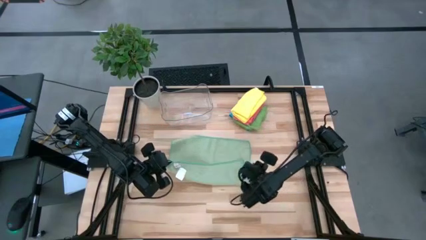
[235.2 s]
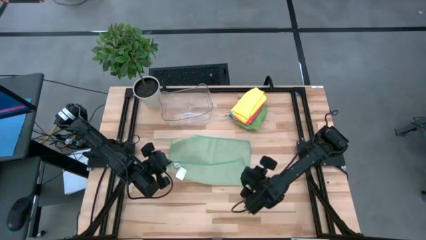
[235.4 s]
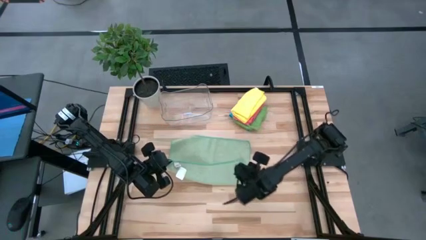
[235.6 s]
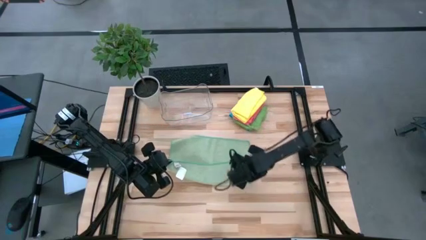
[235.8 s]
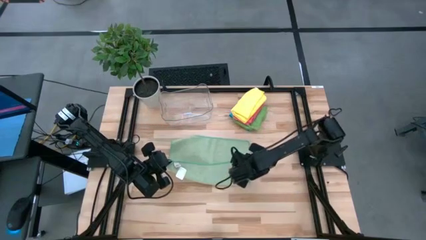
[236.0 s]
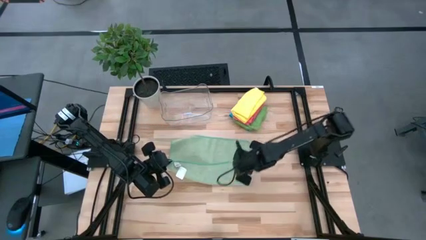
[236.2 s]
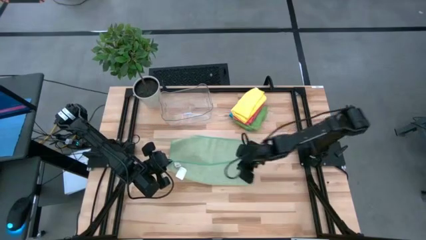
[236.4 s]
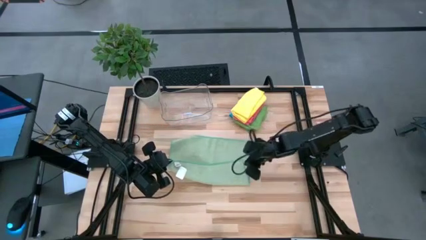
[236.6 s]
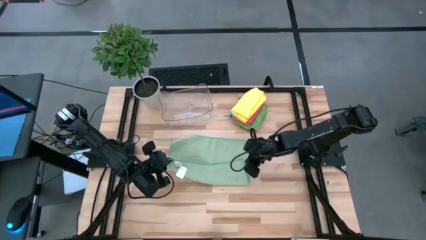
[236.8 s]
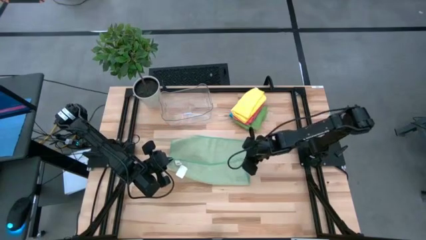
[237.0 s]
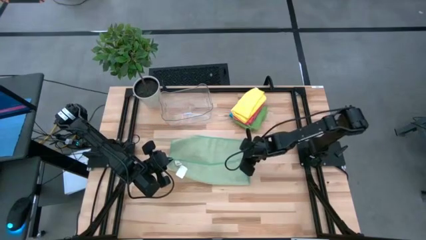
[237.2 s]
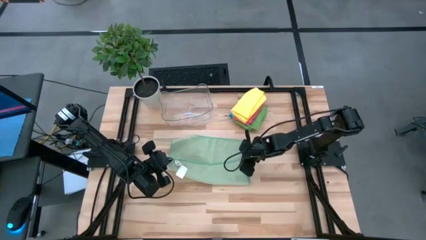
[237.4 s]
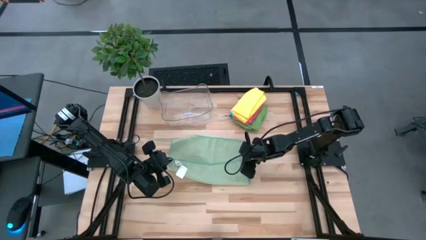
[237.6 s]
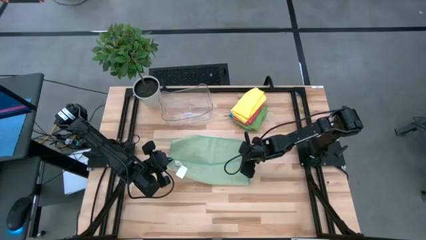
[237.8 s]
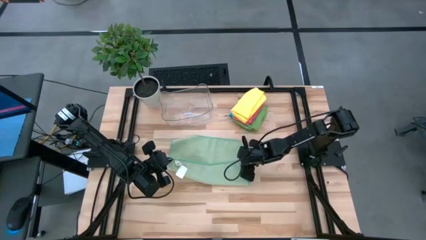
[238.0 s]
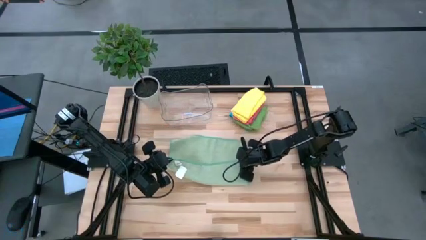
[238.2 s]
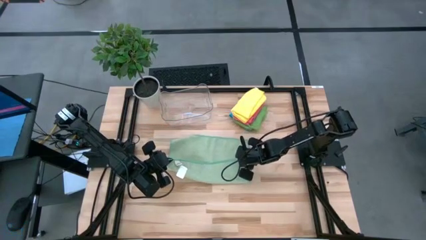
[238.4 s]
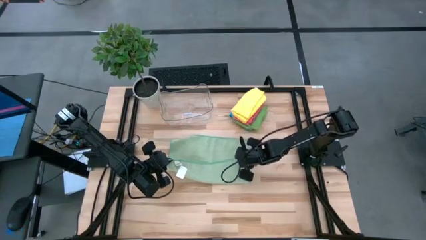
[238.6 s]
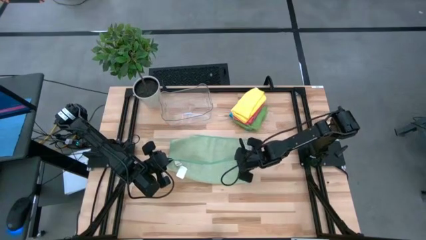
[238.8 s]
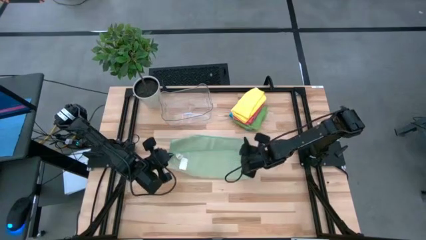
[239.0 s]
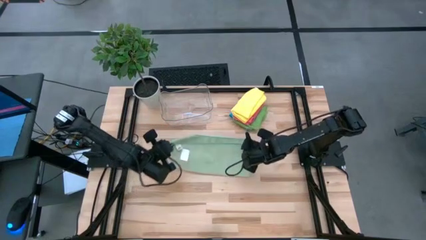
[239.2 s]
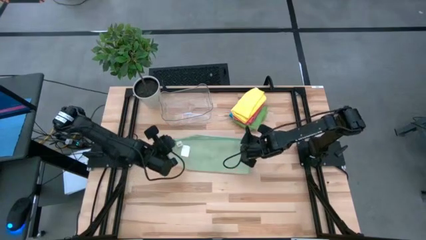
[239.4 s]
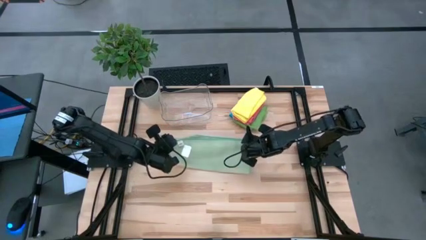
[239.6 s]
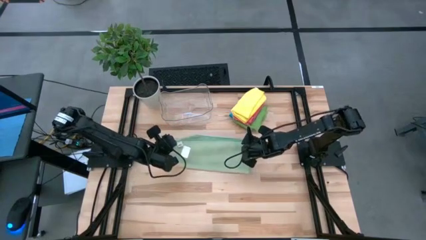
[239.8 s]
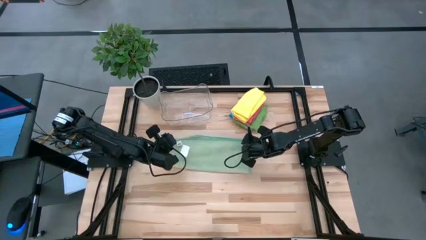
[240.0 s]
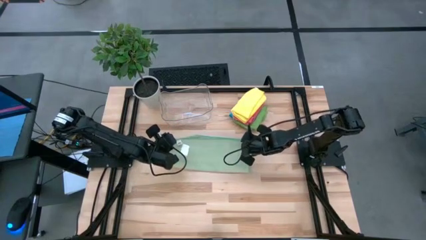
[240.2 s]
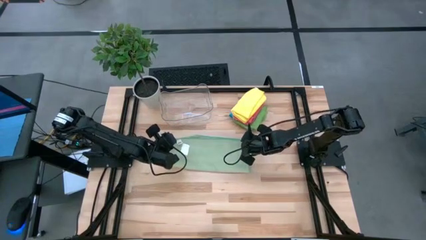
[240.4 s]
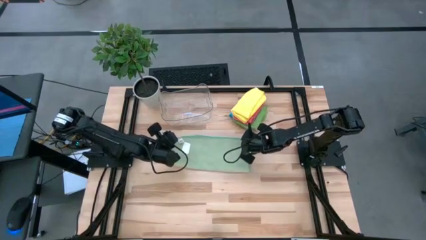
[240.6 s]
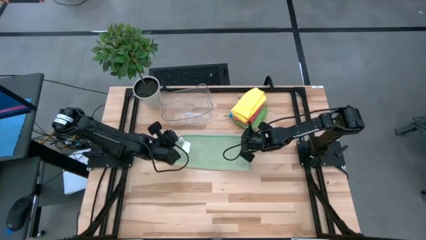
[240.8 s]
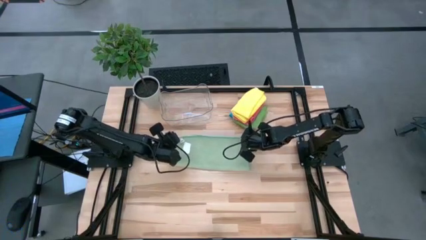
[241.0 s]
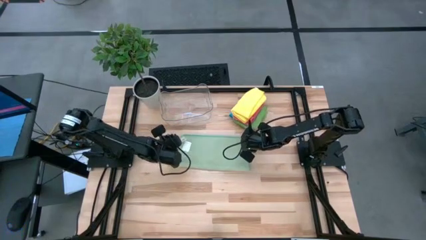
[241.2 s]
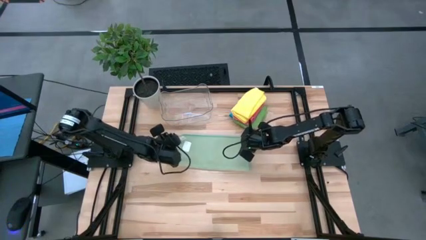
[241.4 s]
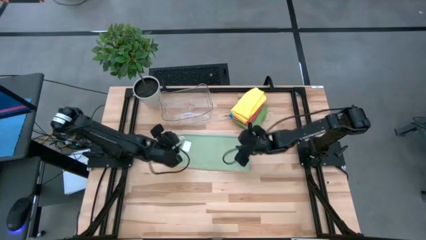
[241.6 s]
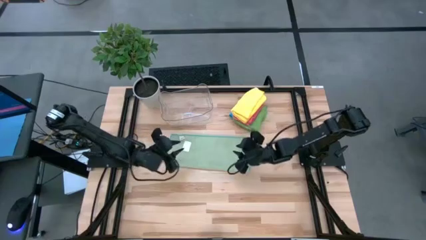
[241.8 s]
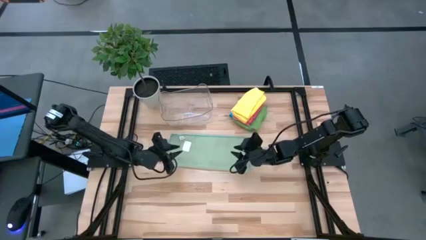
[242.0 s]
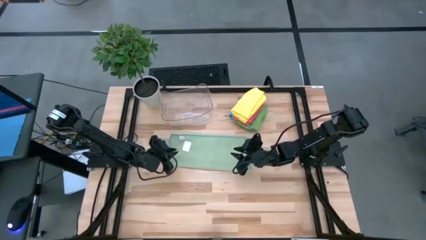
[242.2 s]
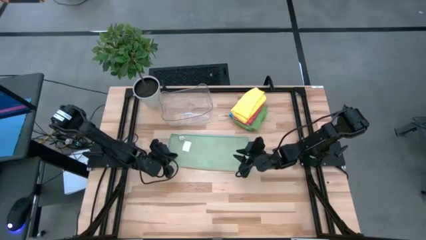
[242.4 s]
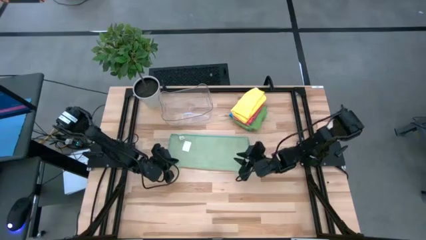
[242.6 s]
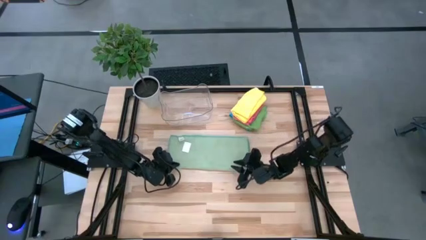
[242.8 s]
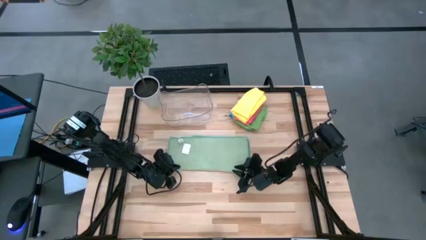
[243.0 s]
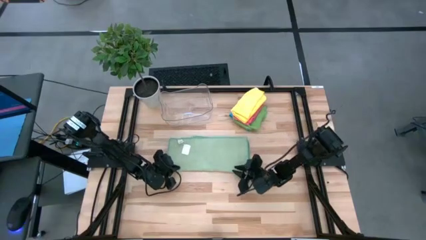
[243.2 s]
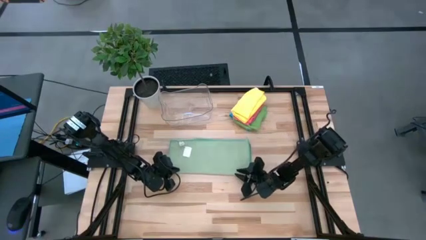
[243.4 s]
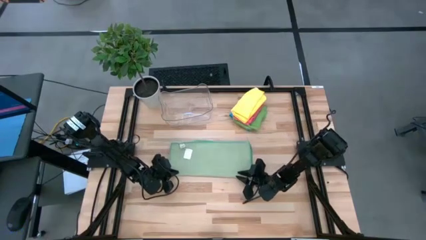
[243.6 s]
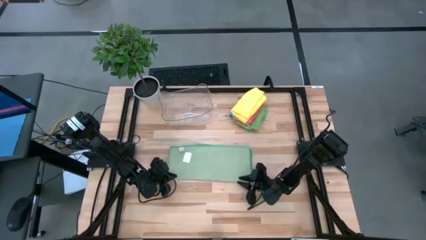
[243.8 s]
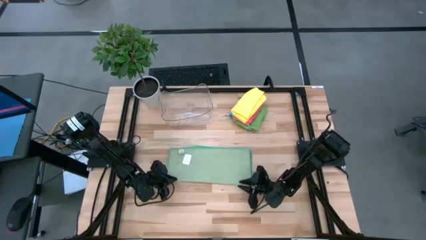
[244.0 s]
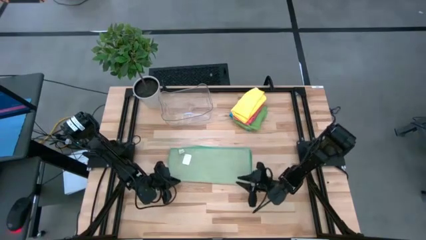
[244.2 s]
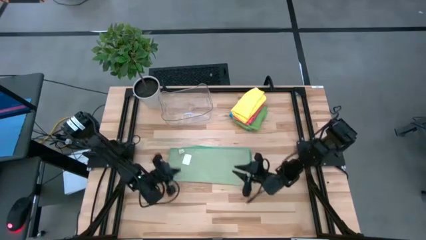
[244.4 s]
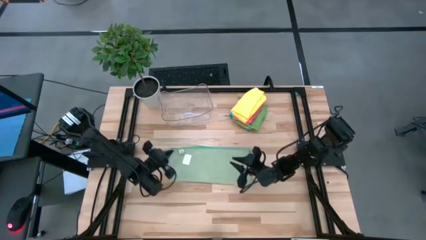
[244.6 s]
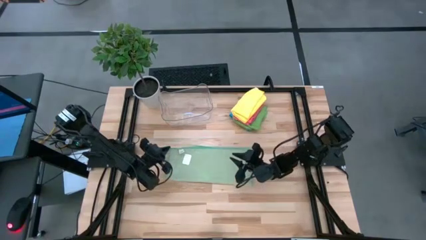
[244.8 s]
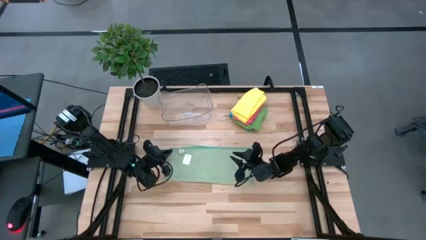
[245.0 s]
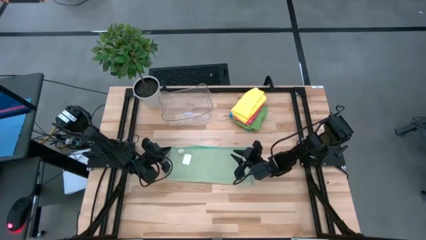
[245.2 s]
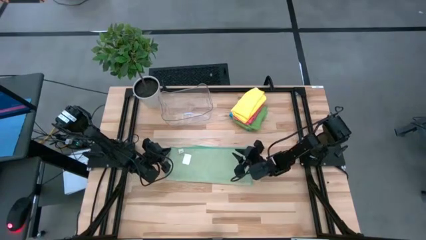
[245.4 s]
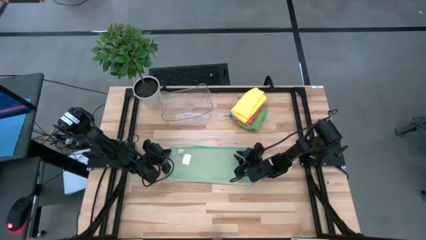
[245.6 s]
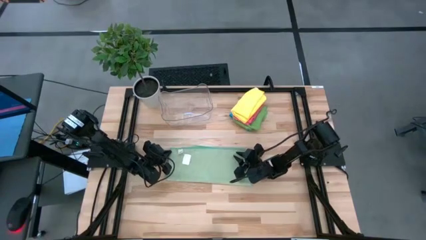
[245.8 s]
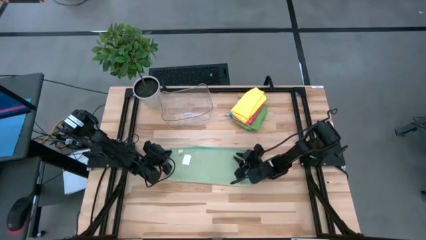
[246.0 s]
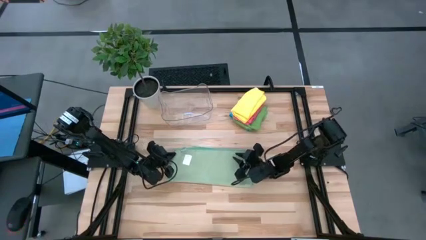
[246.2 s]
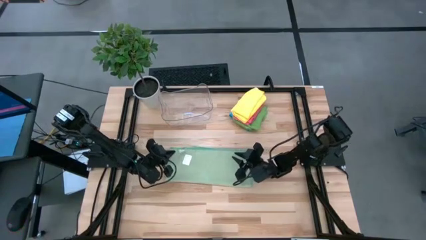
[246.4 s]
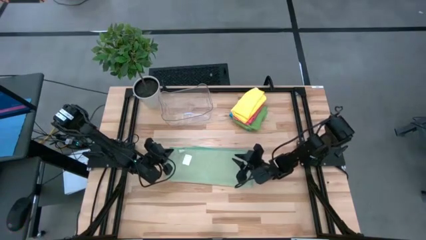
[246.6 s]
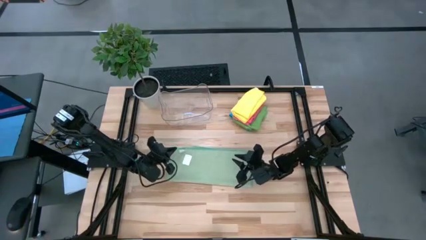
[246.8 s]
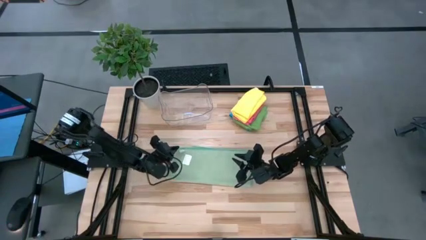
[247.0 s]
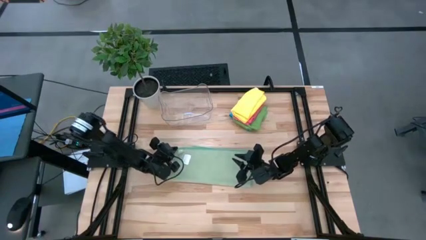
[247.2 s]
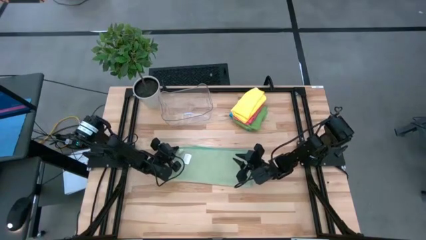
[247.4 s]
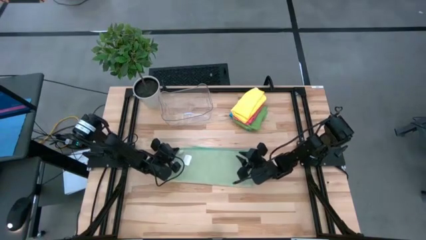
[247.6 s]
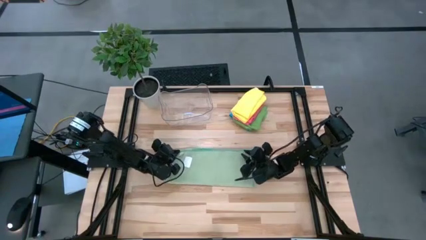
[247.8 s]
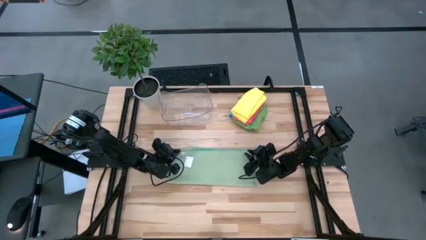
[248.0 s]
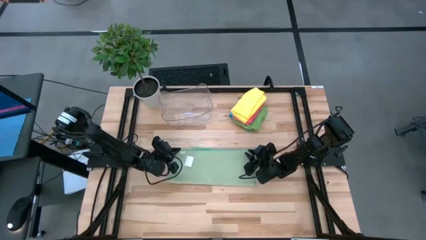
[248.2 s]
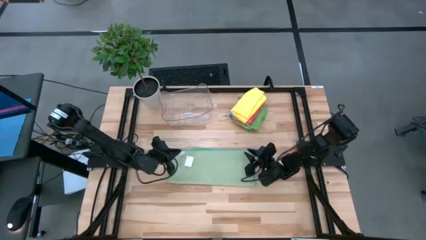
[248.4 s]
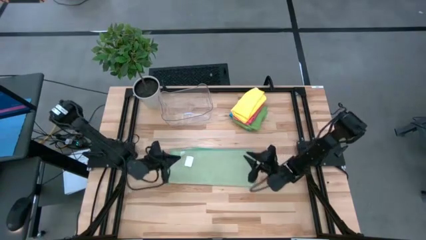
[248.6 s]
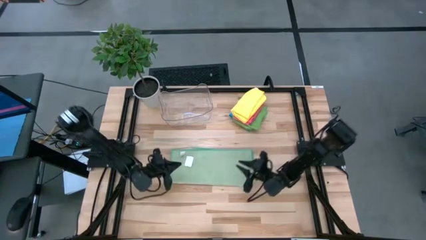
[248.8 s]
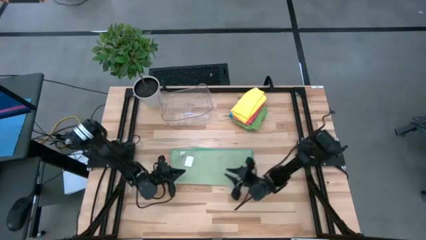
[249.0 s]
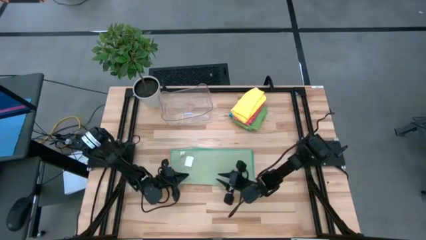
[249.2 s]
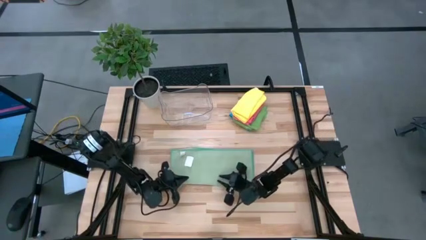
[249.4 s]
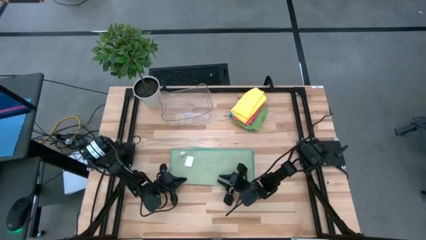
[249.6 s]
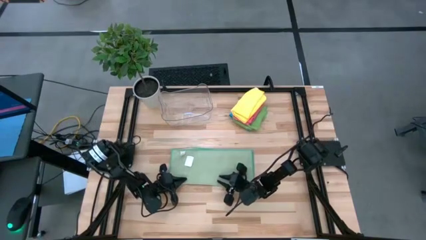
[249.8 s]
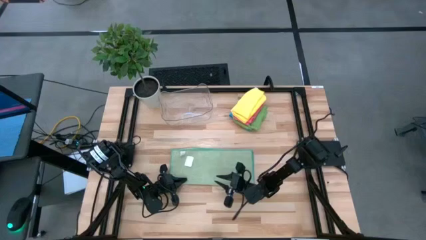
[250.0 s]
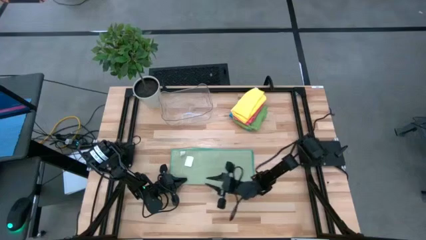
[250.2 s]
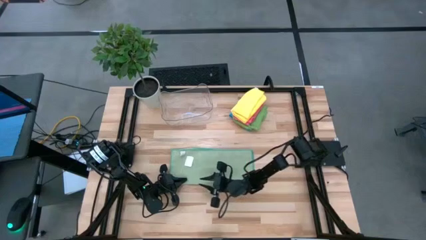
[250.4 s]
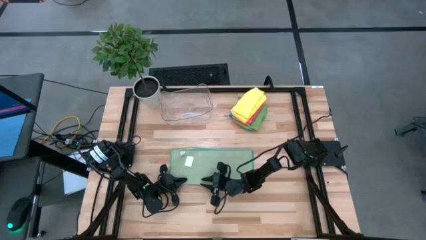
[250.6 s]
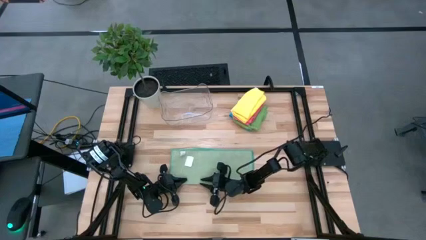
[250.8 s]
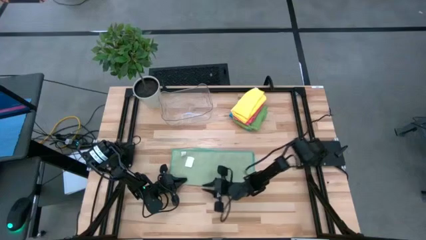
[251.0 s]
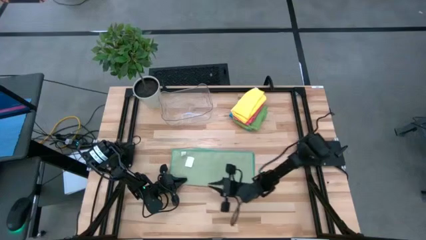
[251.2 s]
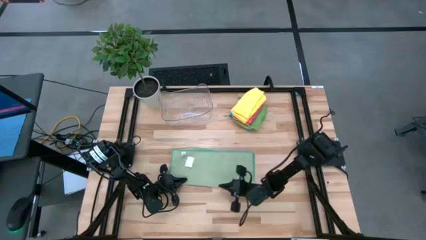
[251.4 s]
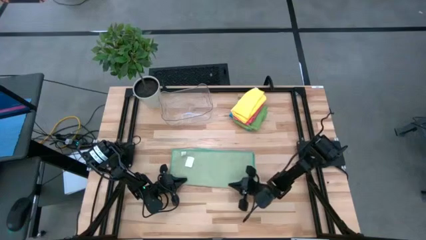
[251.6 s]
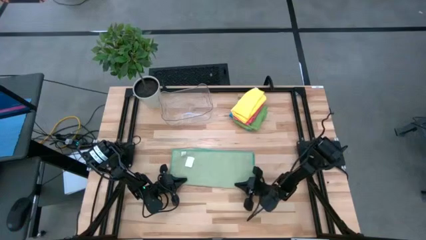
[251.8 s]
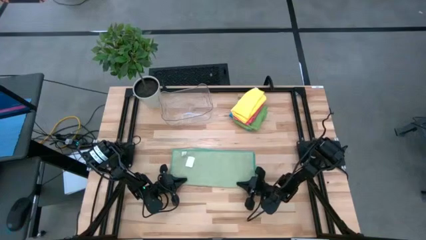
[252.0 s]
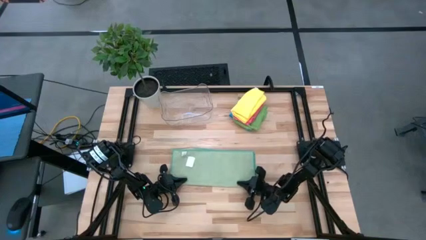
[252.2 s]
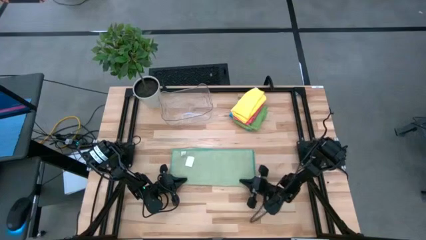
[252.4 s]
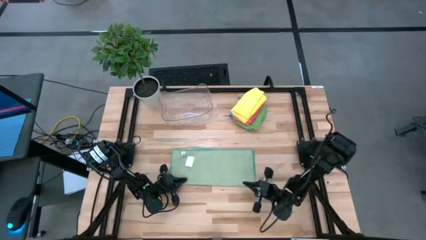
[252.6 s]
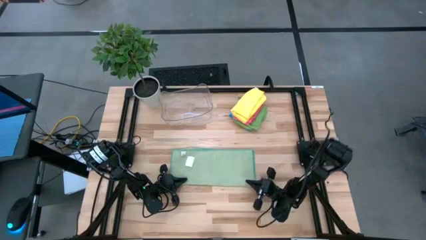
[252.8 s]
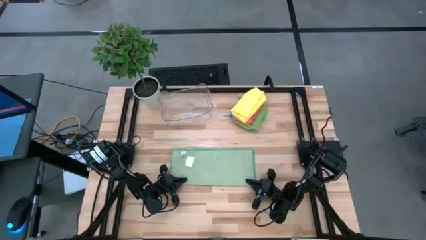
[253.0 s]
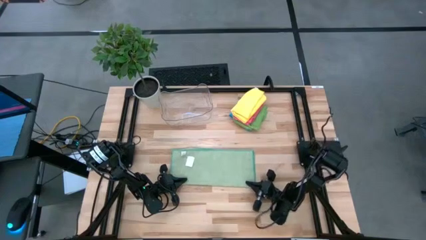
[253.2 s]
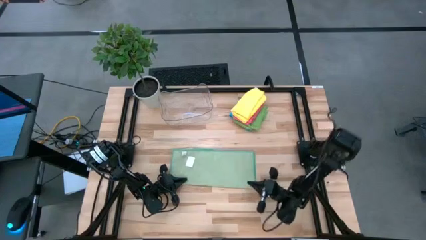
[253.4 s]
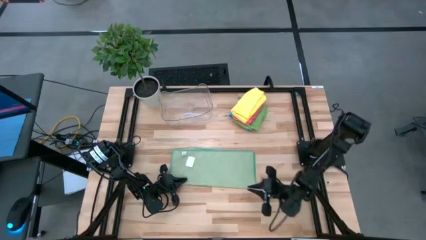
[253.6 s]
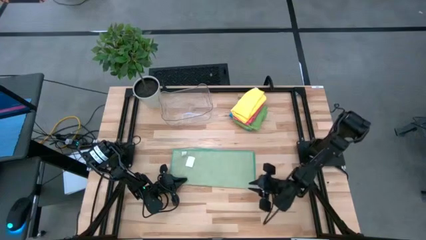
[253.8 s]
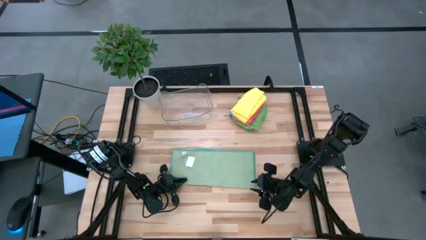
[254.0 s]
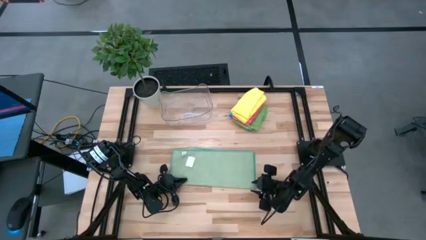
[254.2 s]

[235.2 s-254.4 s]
Task: Fold microfiber towels
Fold the light green microfiber cloth
